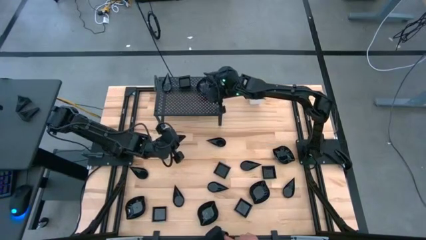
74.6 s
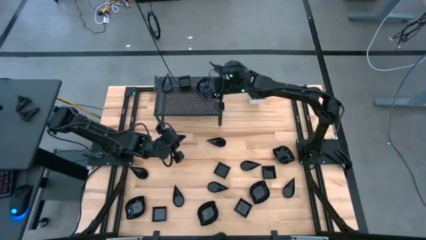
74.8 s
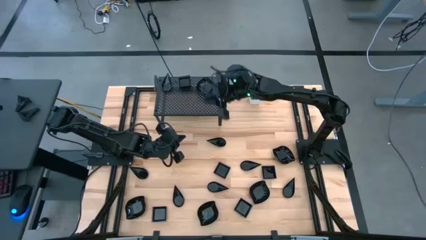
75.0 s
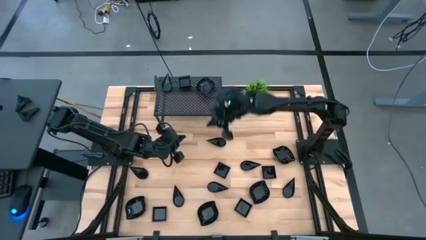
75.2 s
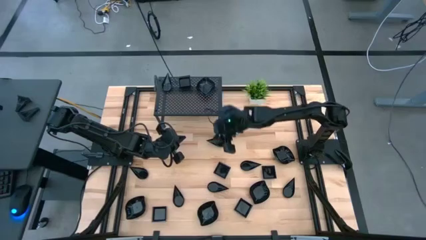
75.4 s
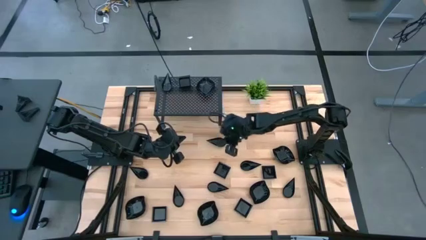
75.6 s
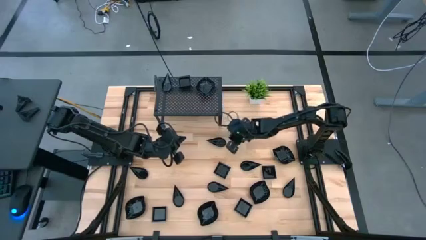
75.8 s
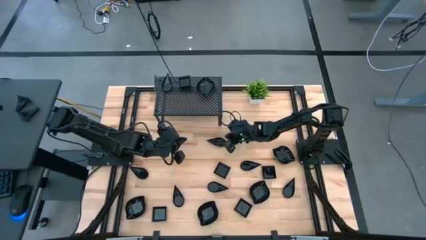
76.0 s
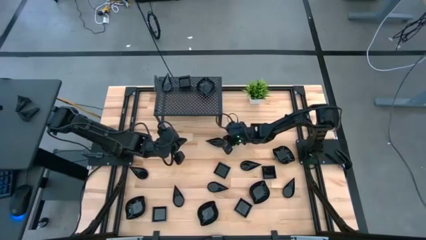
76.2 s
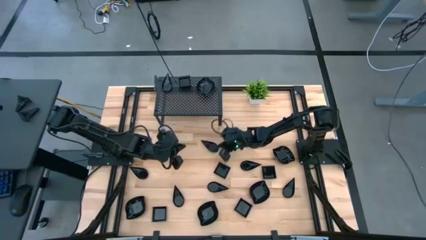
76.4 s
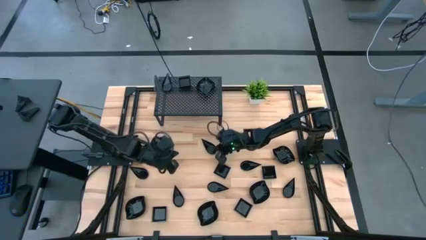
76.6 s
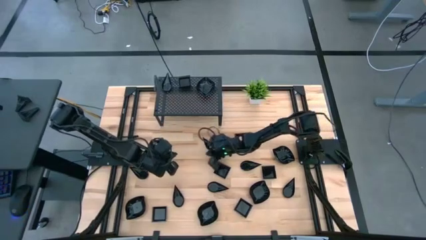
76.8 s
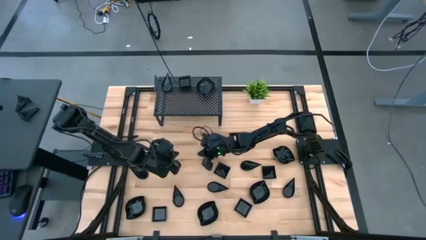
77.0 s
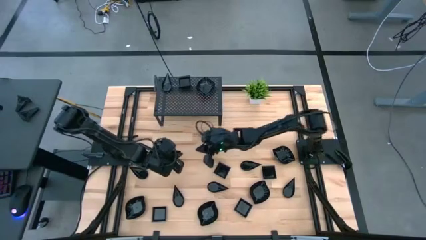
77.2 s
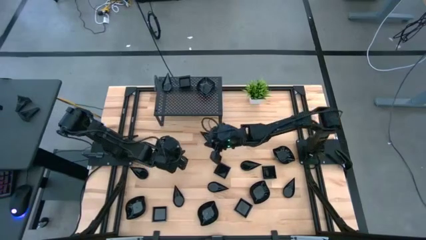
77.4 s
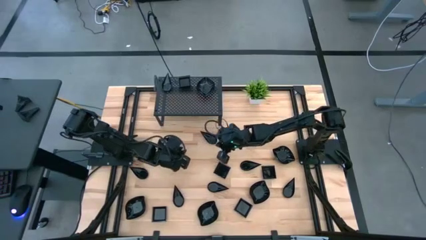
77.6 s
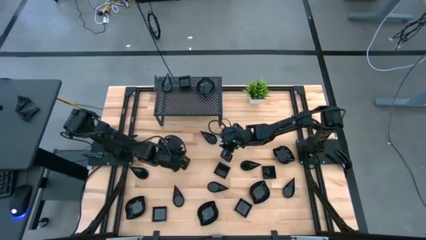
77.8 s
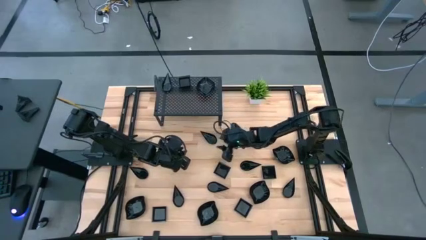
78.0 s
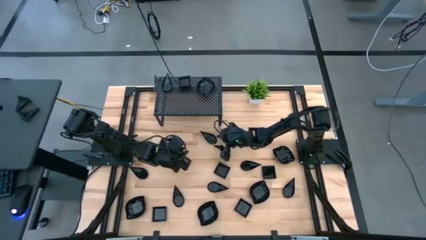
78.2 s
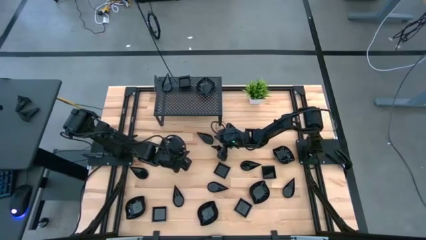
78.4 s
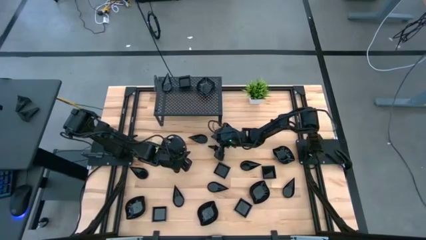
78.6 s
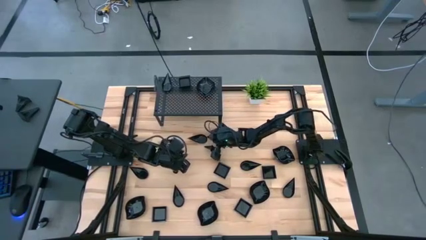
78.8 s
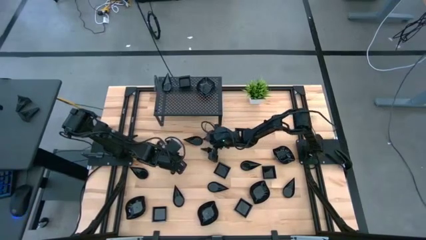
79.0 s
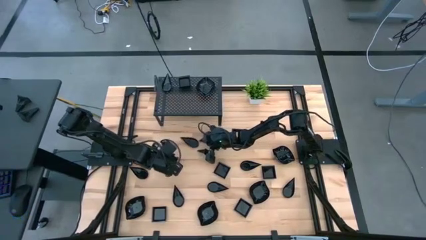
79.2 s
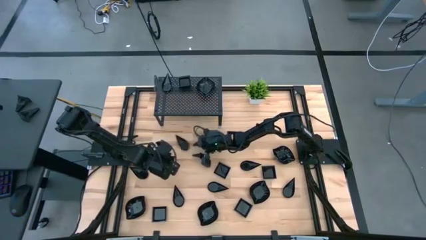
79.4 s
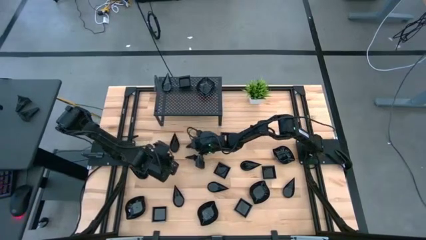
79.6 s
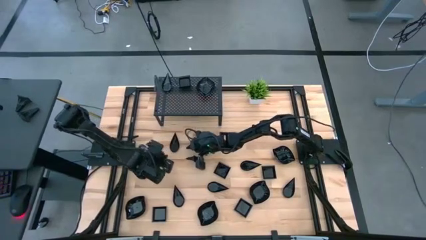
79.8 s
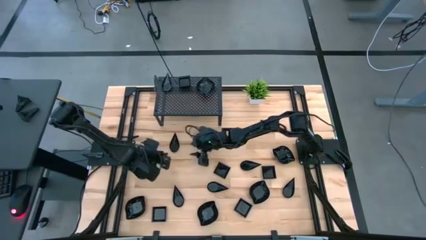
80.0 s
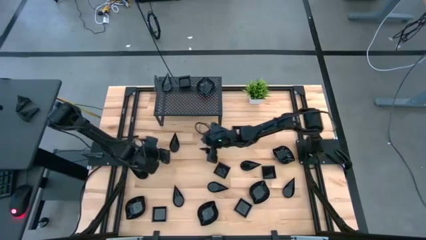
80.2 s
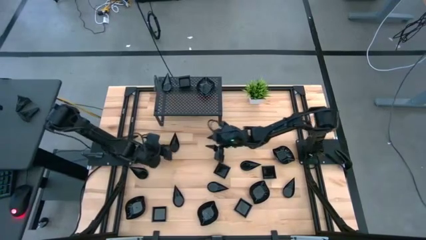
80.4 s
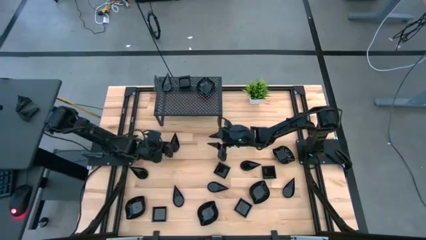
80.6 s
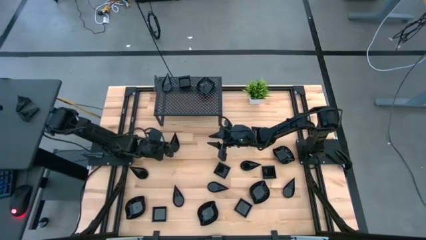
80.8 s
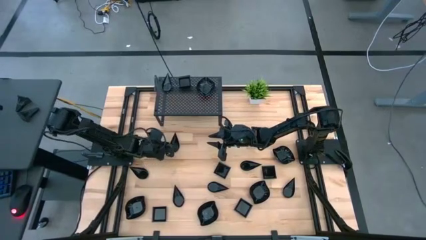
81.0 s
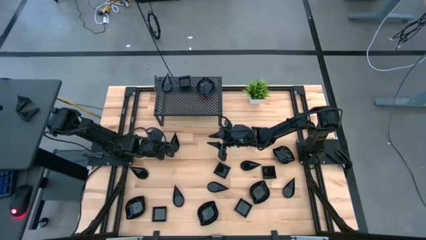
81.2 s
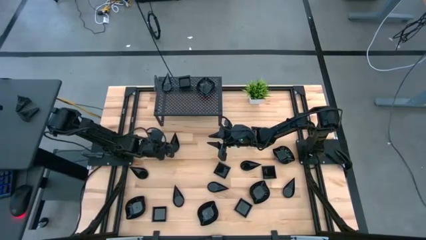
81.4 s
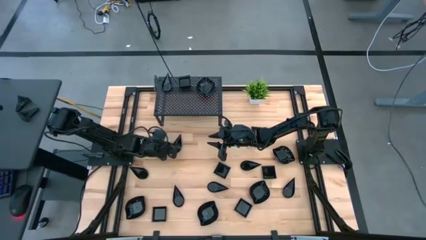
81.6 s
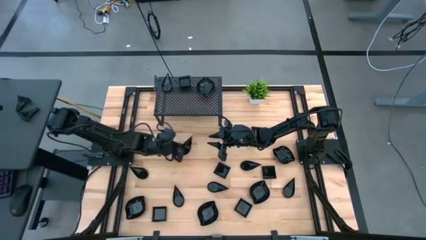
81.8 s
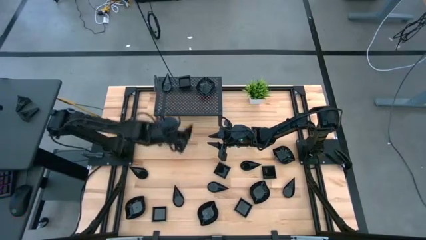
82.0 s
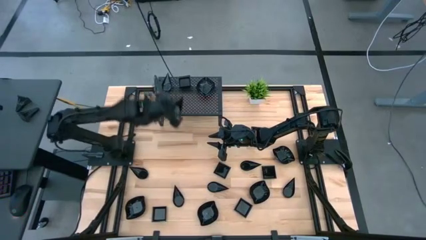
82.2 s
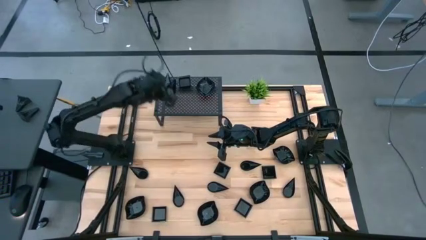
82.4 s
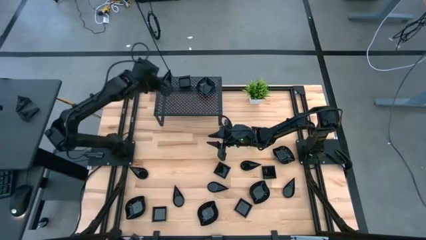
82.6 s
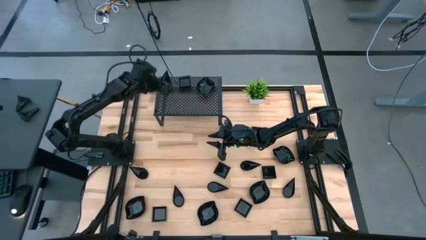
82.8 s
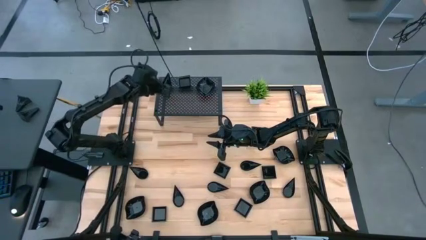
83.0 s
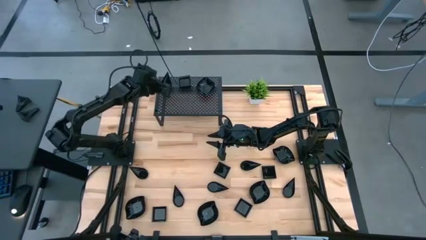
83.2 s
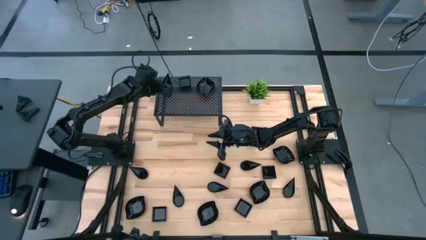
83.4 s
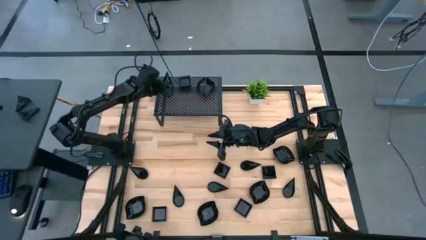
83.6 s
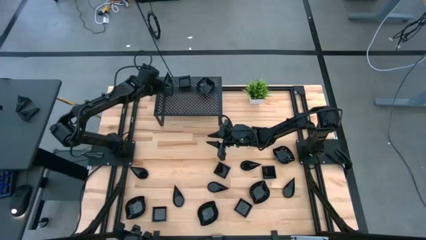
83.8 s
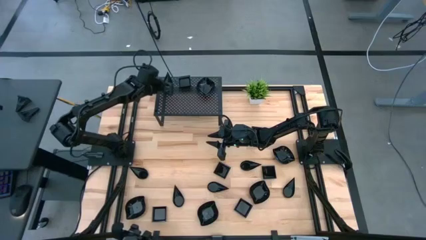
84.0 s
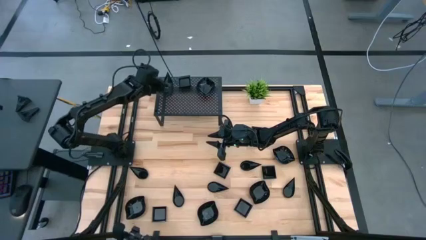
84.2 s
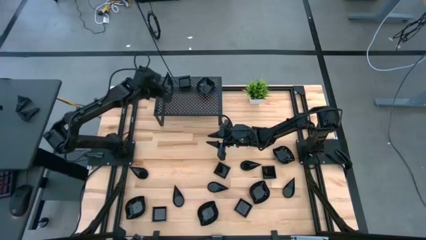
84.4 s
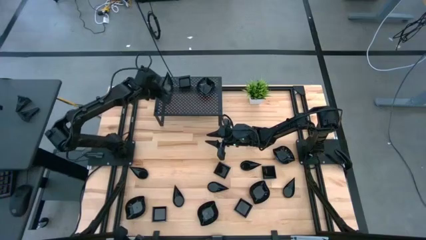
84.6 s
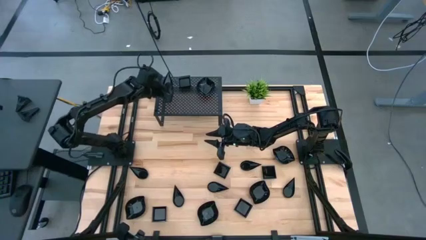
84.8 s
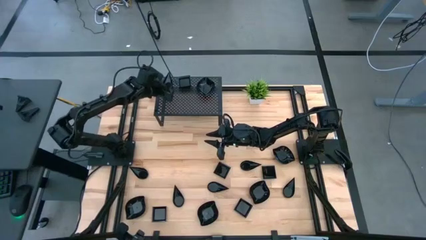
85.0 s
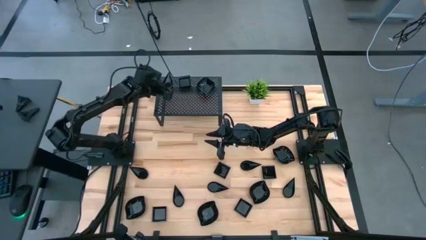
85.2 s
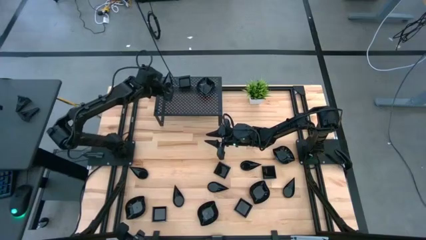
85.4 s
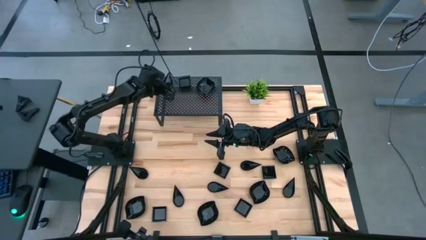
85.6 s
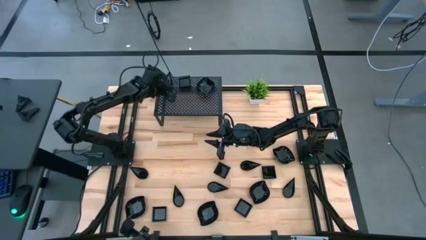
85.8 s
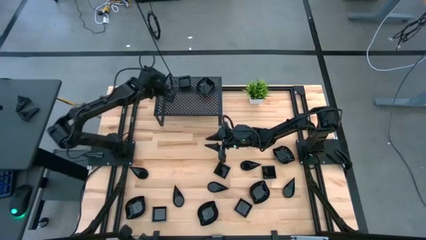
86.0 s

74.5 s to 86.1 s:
Task: Pick & Place Mini shaped plates
Stack the black drop-shaped plate on top of the drop-shaped plate on the shelf

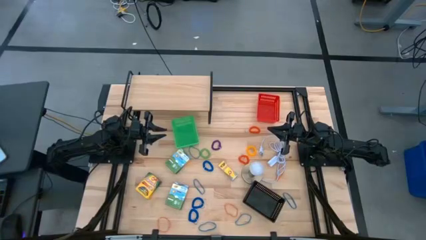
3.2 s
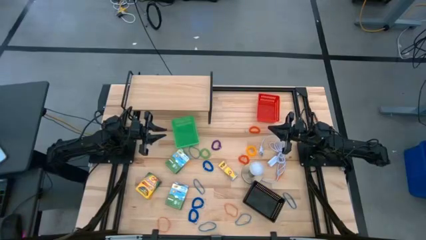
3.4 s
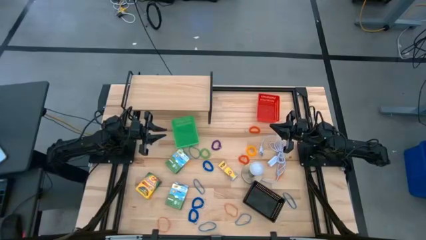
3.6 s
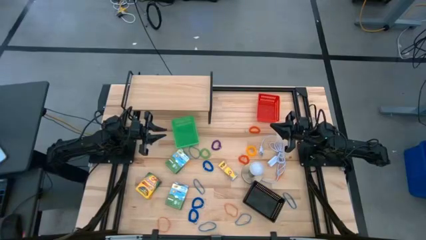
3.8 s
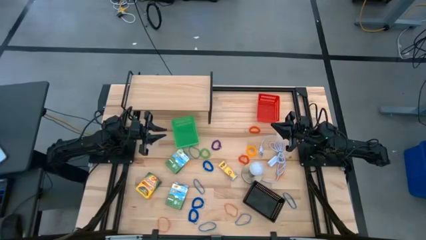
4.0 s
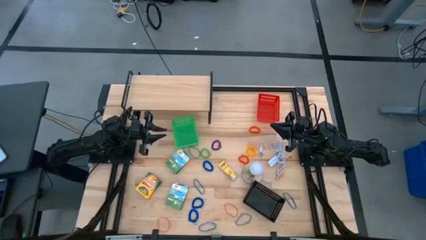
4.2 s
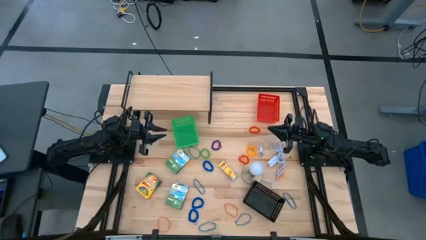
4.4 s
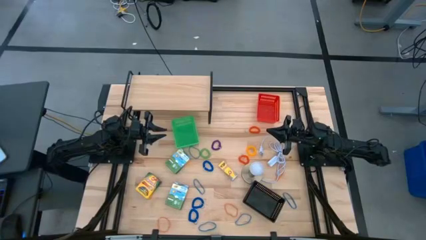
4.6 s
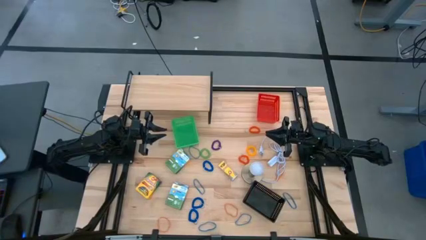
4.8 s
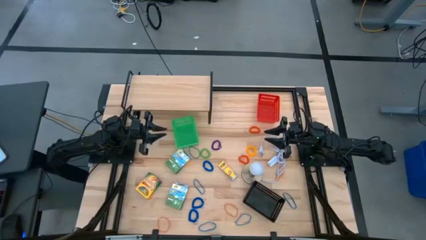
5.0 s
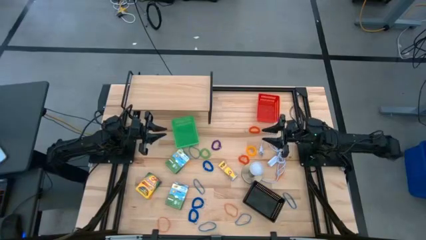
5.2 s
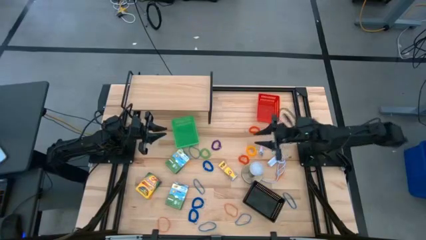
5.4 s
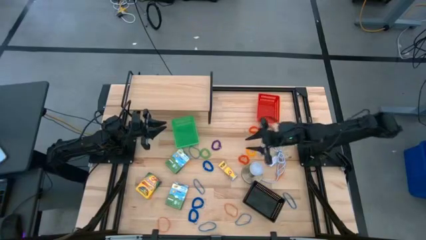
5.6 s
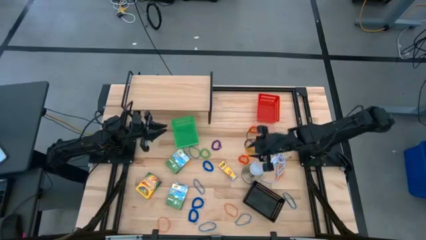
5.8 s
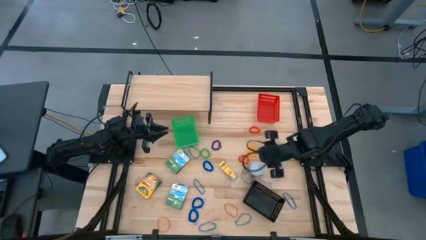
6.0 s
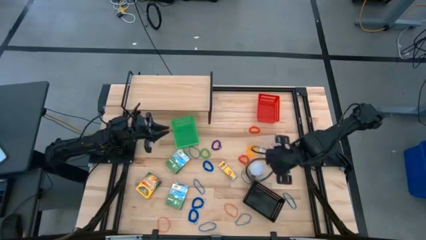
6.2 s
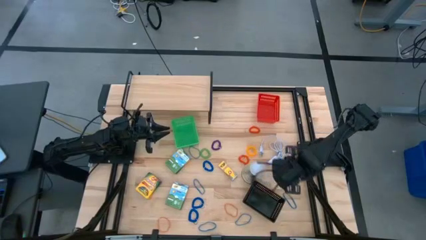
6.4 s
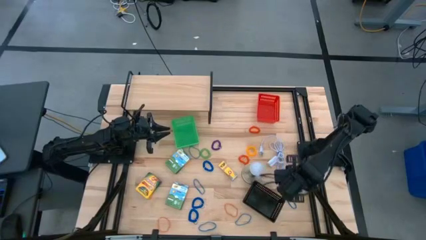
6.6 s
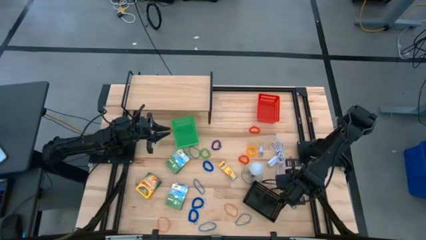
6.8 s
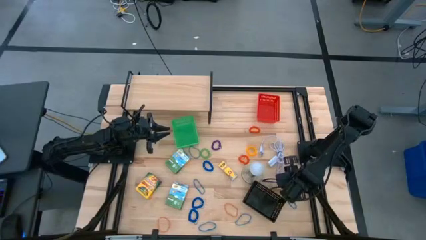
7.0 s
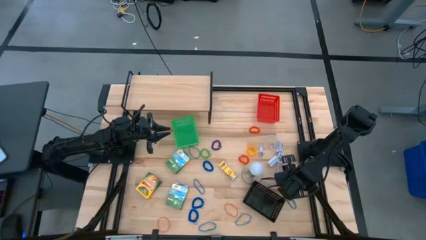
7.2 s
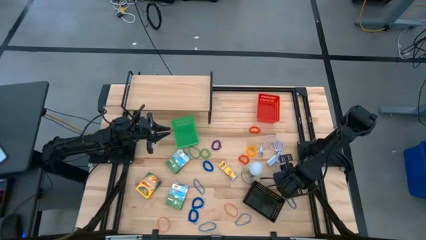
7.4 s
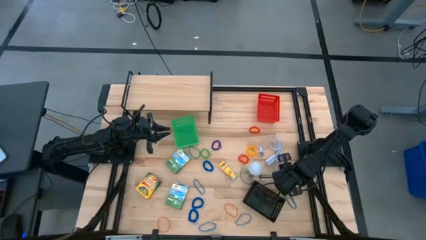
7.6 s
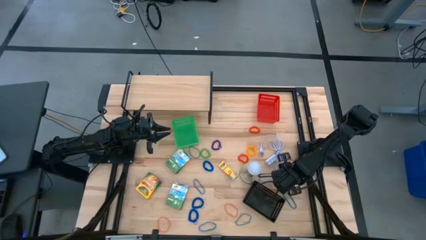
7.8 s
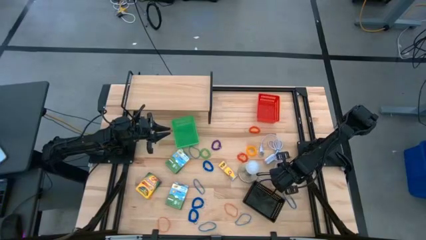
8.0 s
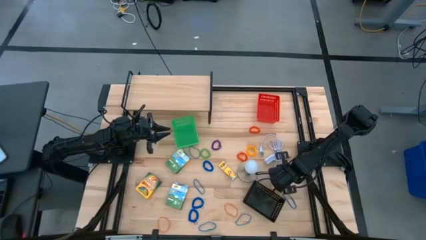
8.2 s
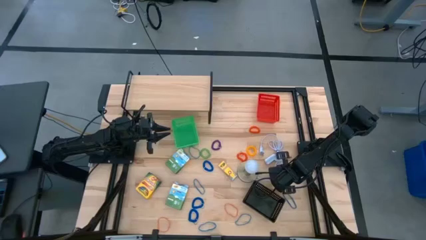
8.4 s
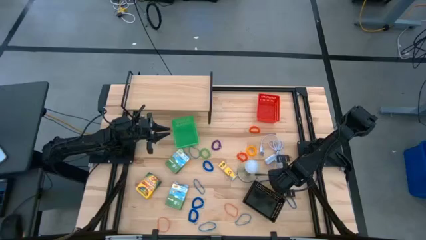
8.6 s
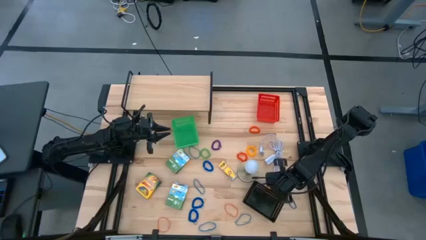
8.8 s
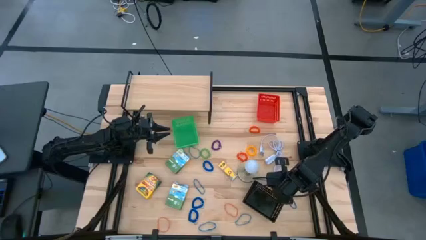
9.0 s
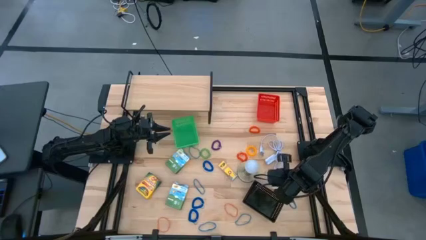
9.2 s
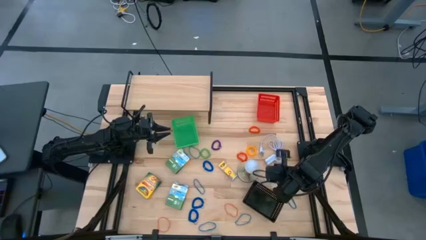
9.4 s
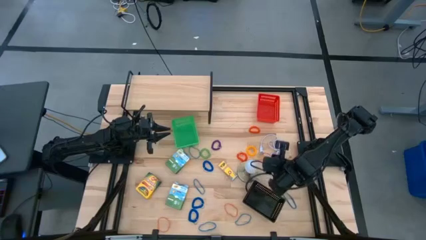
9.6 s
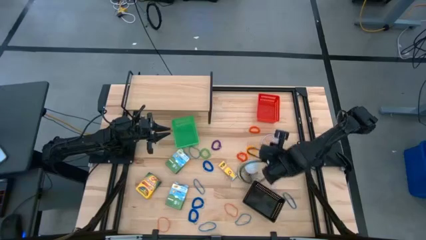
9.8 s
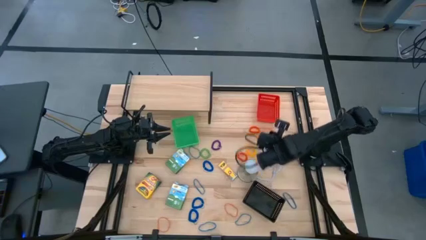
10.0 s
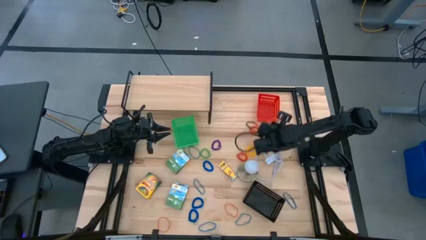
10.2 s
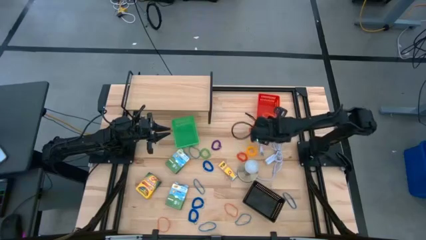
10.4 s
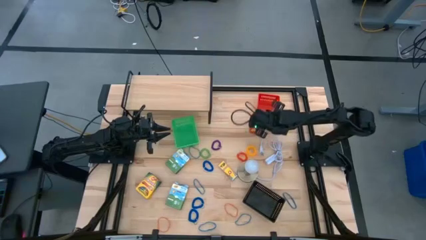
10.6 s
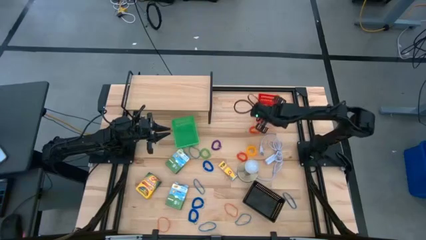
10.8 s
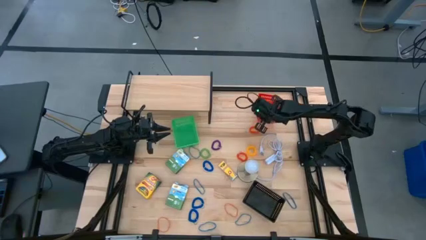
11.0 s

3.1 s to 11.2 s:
Task: Pick & Place Office Desk Supplies
Put the orange rubber band into the red basket
